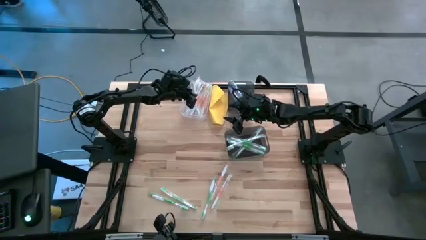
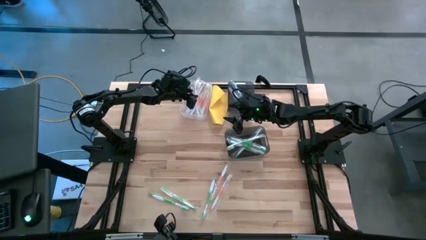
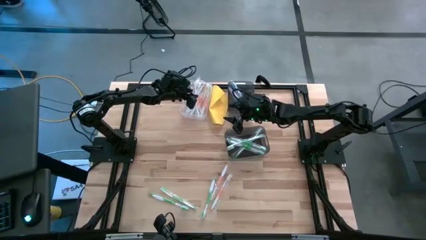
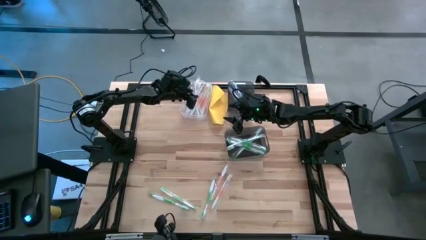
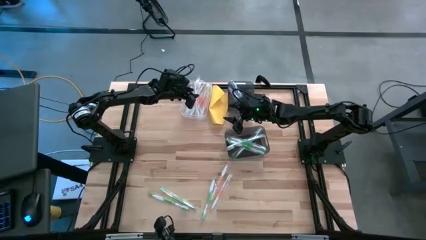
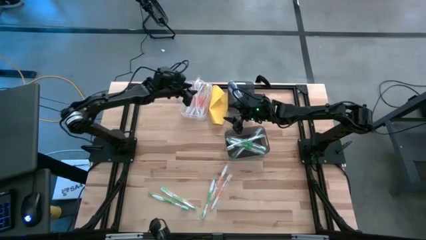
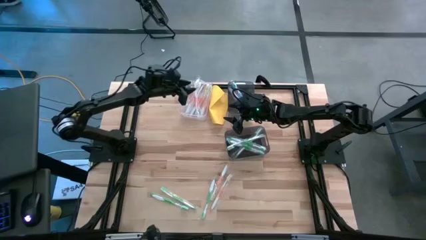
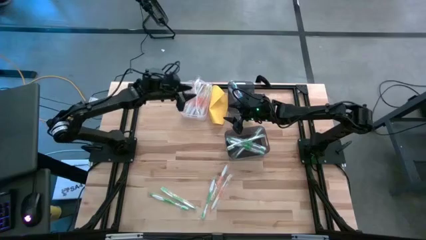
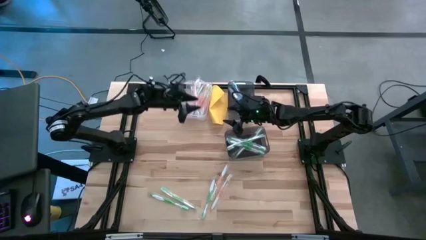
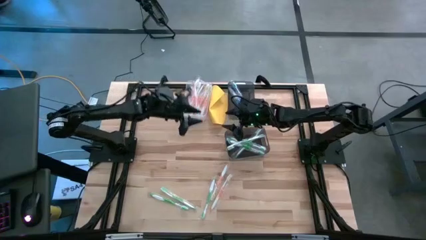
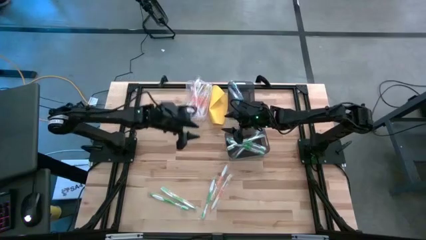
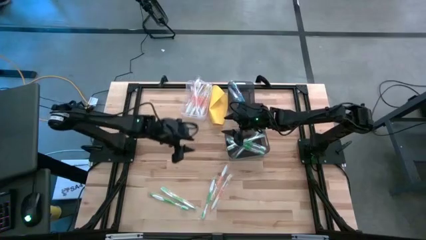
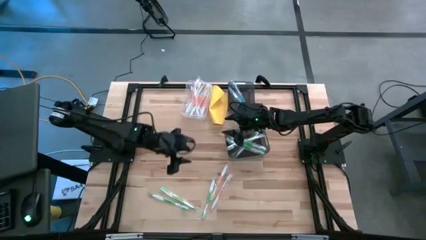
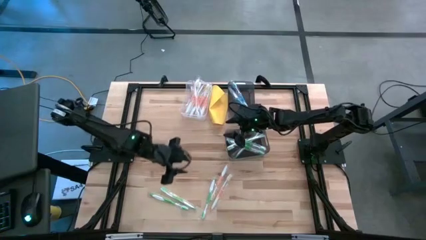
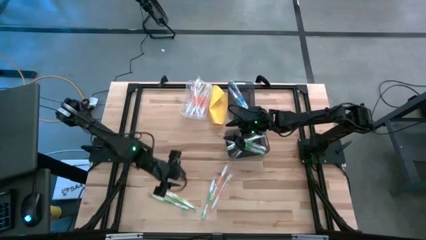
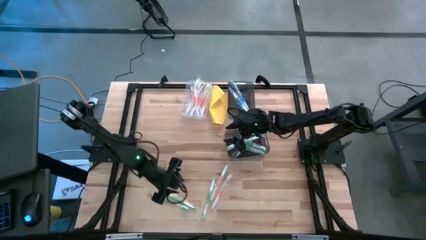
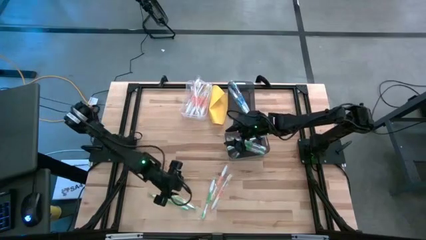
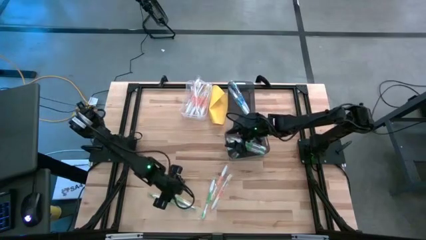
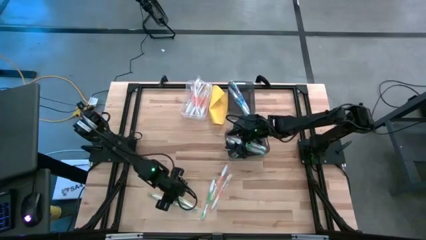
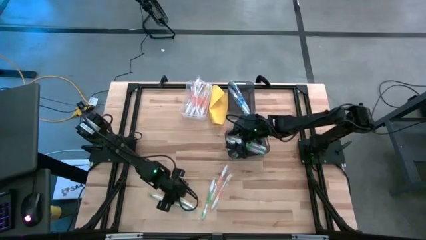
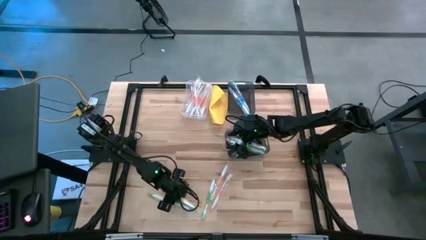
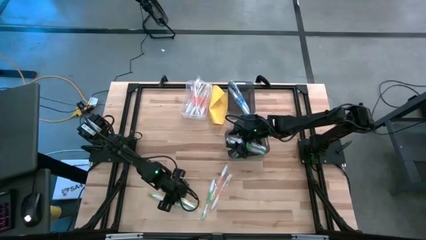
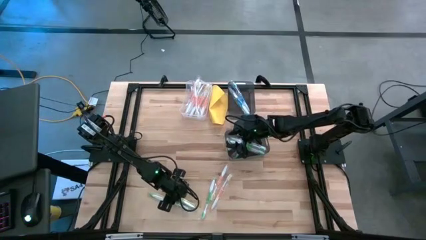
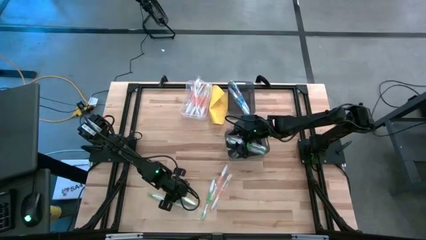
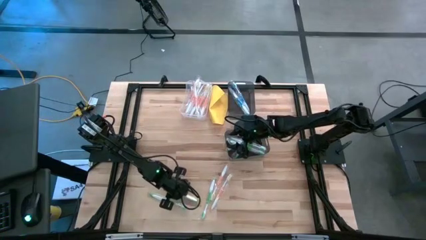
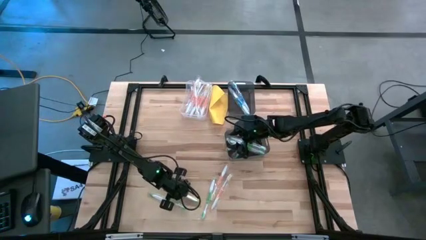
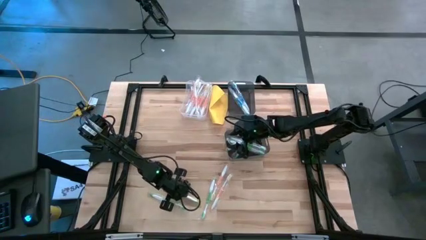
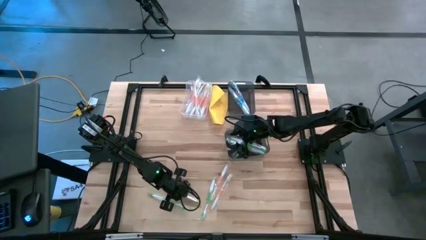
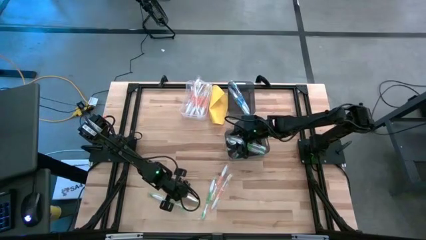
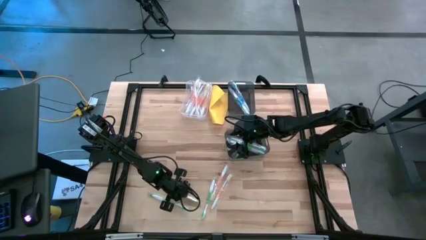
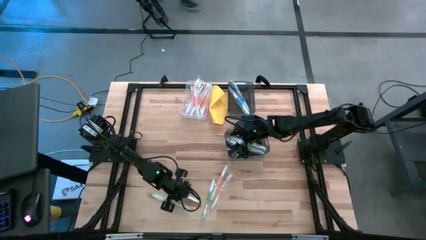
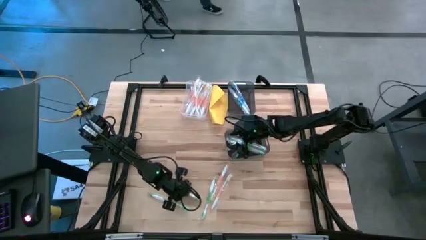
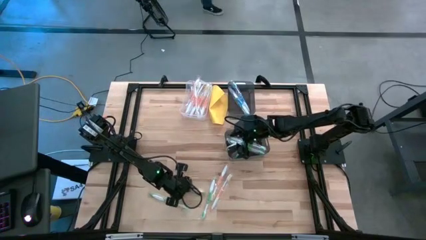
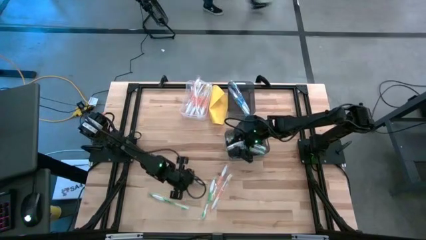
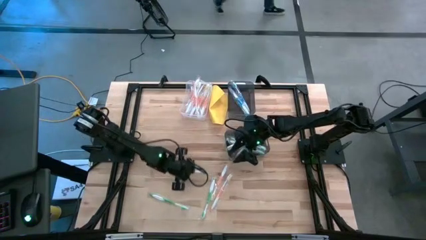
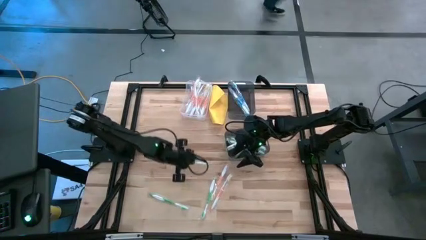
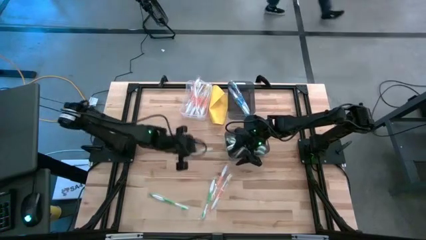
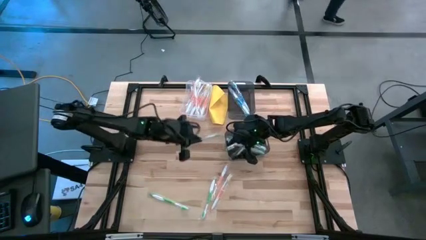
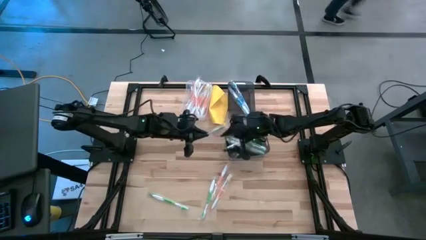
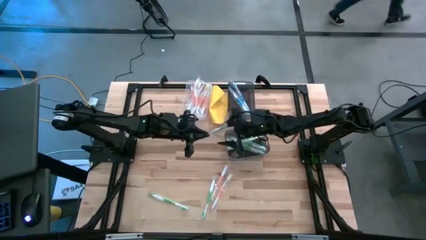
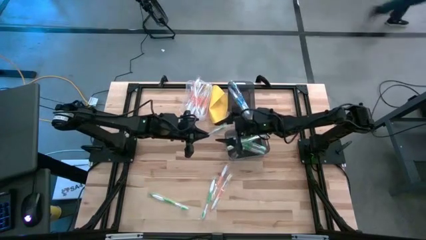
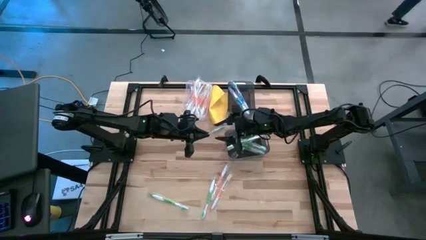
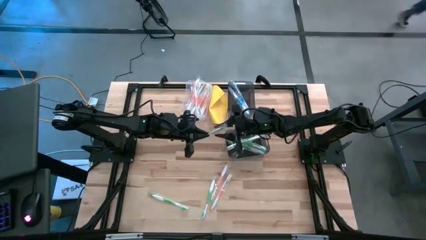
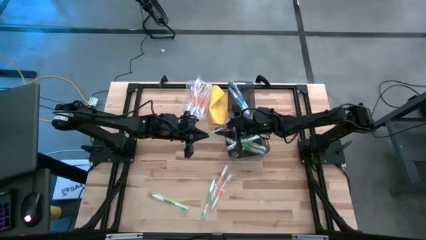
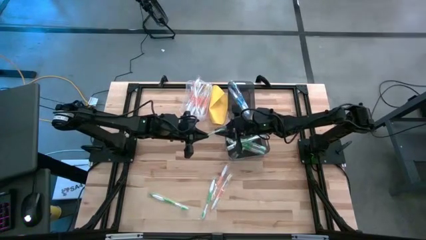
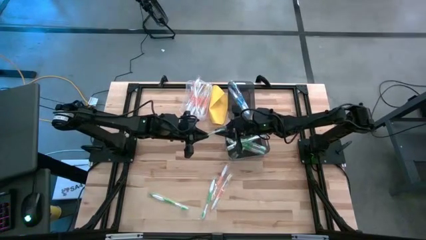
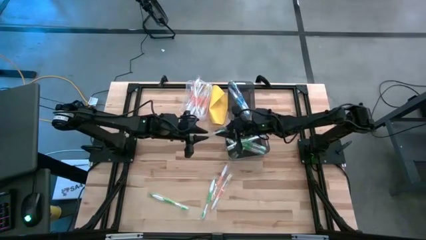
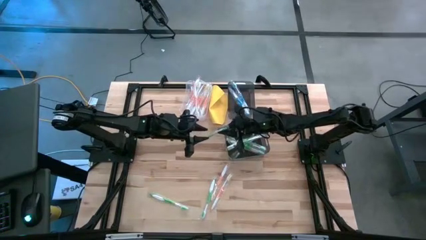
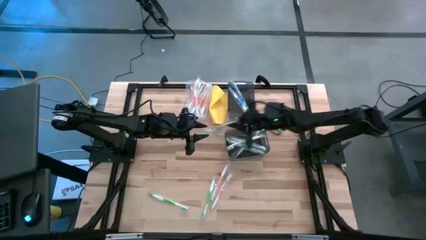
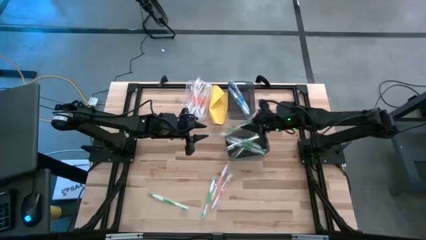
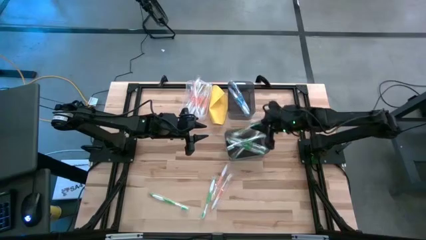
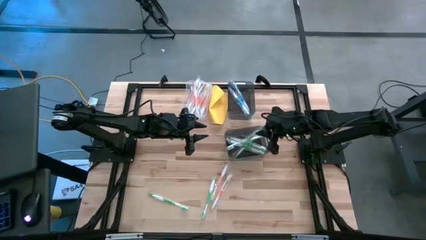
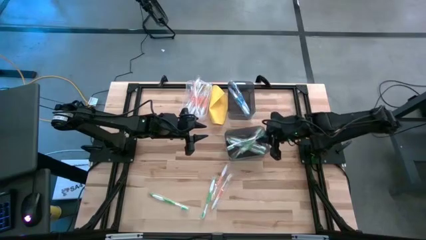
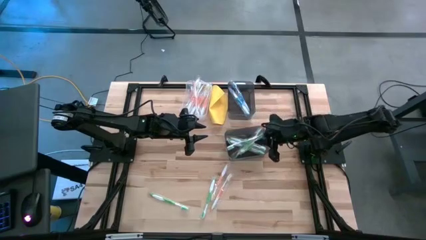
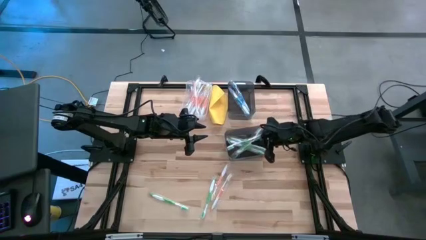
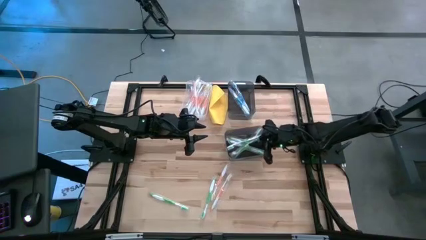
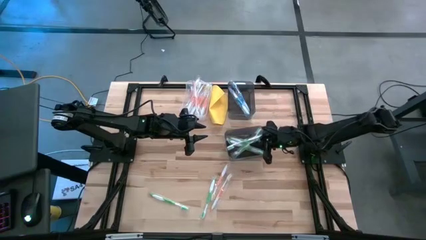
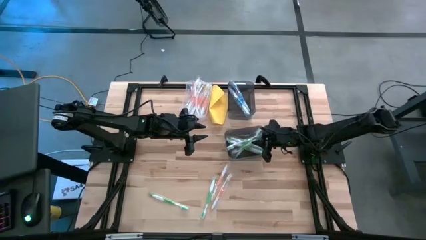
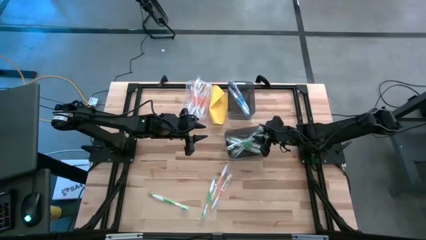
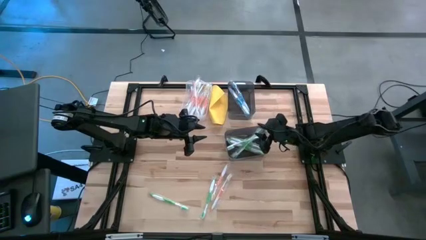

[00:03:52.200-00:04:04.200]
Task: Pick & Place Toothbrushes
Put the green toothbrush into the bottom black transparent bin

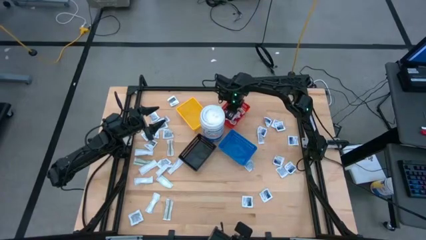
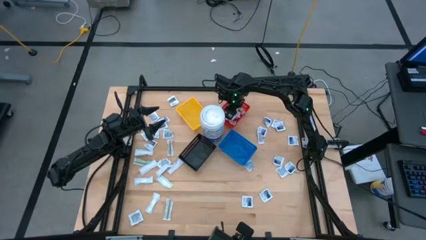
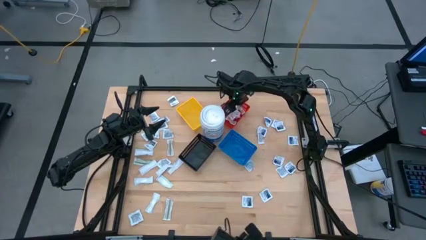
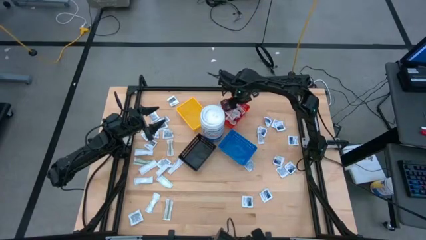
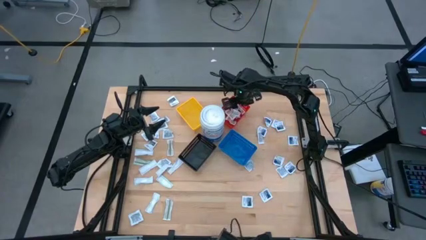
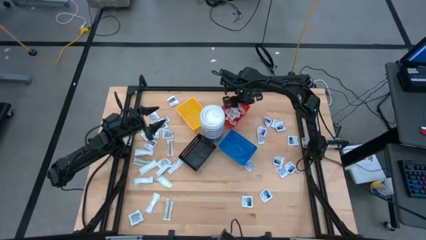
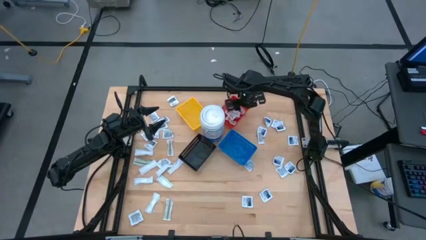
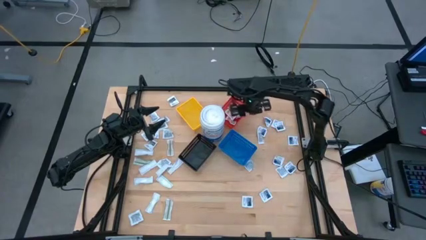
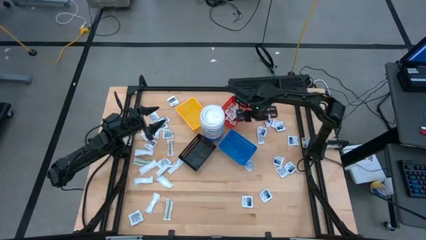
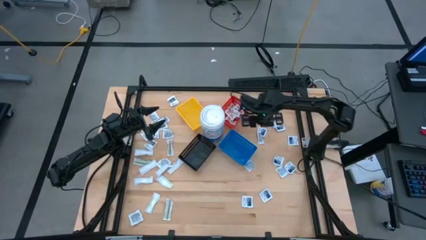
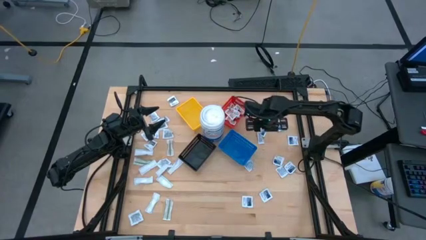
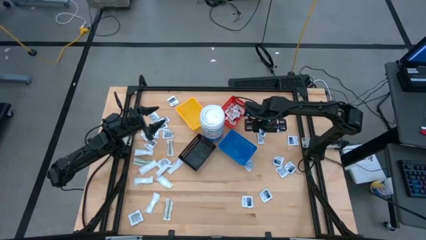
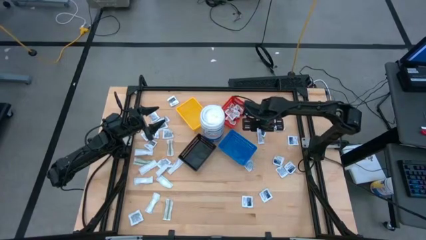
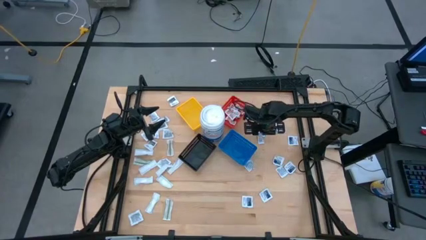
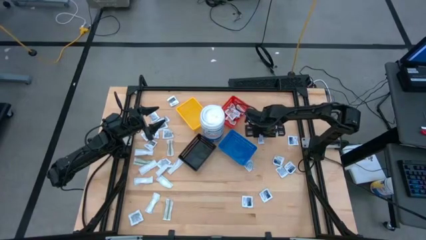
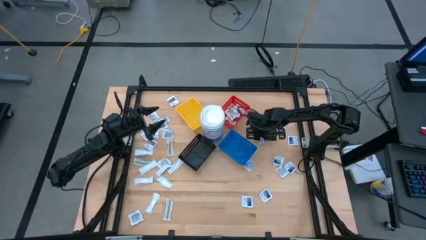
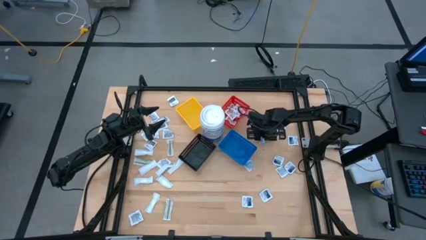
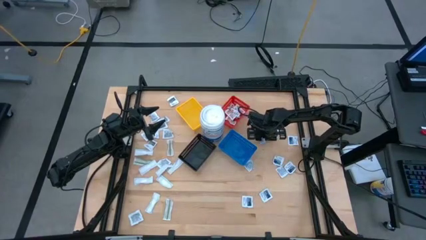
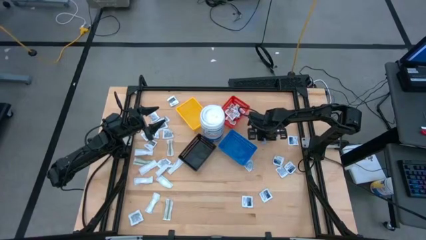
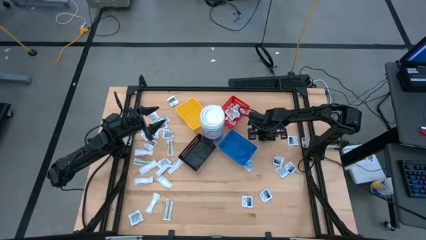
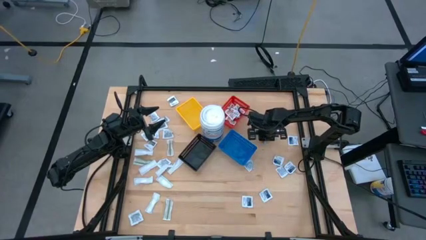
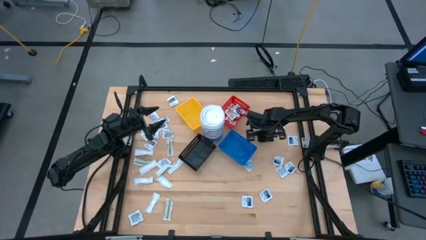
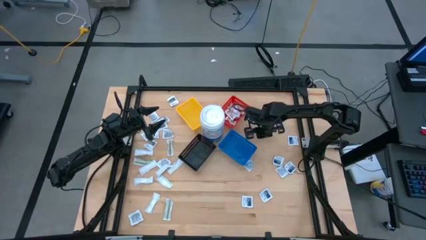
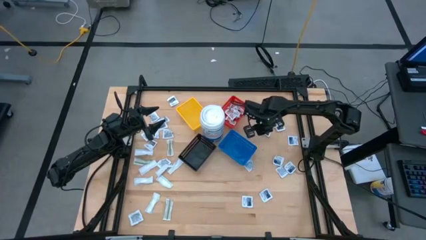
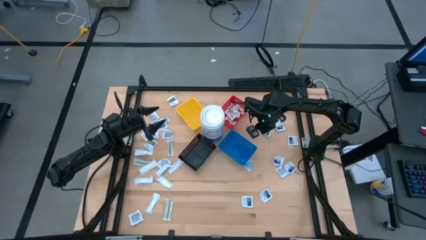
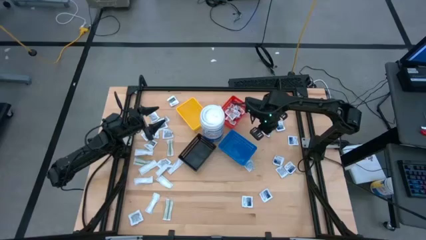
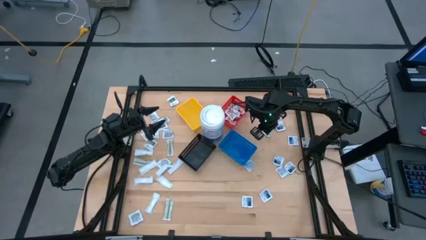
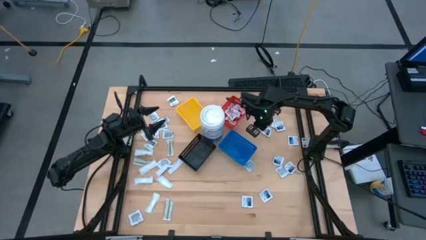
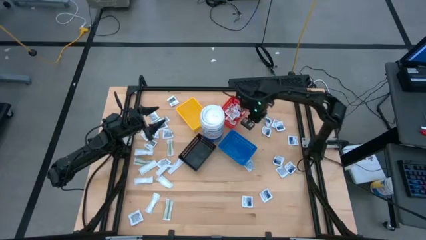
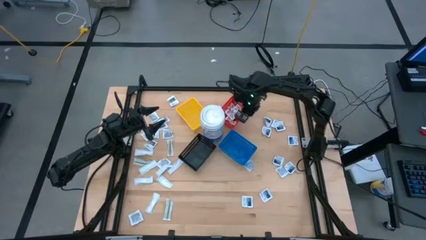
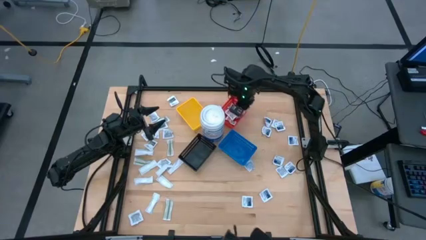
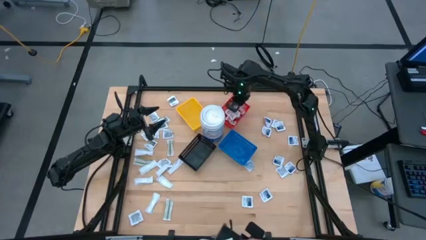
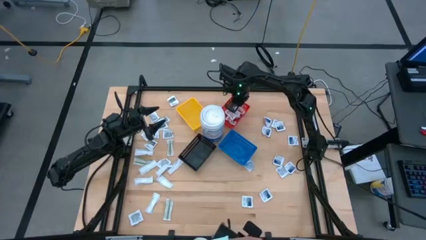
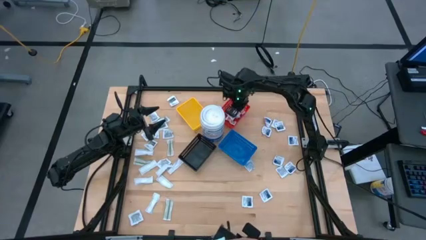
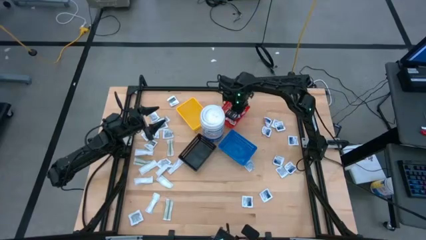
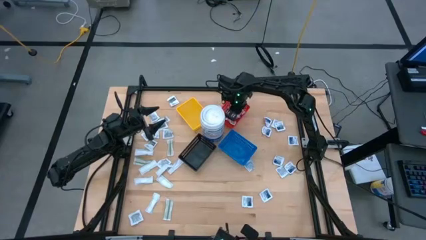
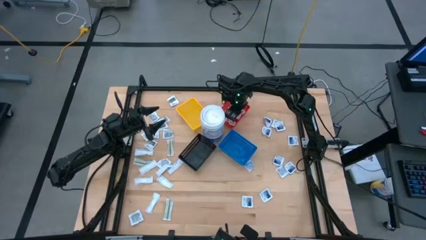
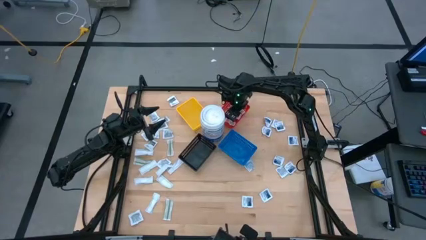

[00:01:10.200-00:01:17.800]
Task: Pick & Place First Aid Supplies
Put the ointment pack into the red bin
